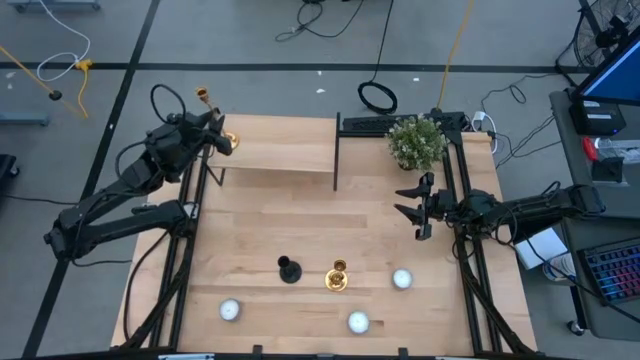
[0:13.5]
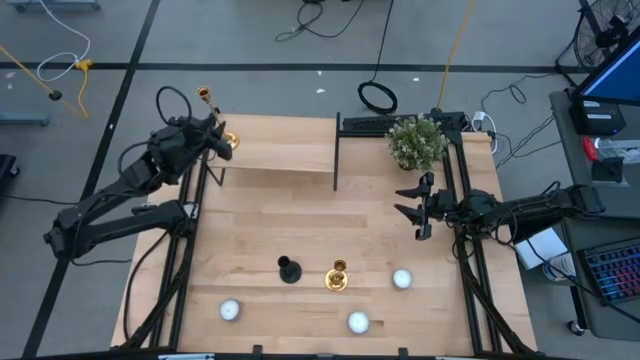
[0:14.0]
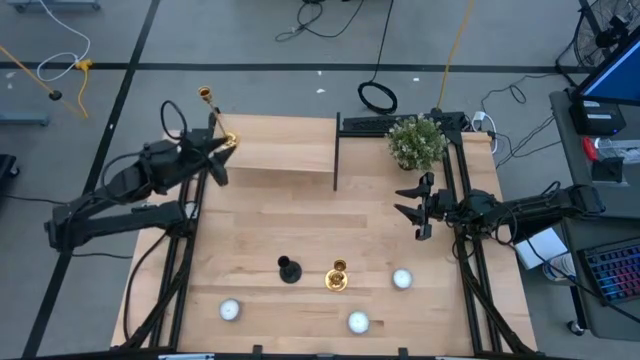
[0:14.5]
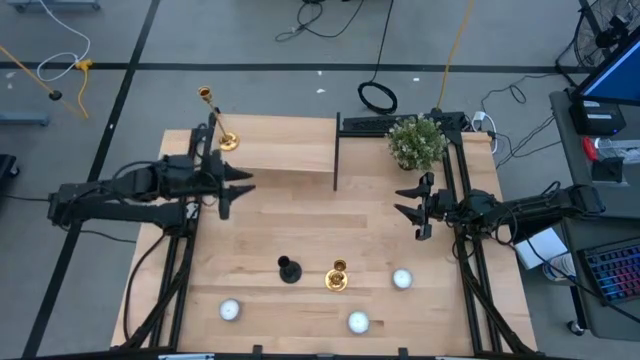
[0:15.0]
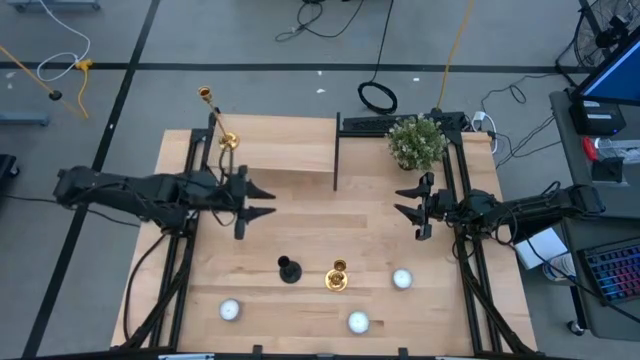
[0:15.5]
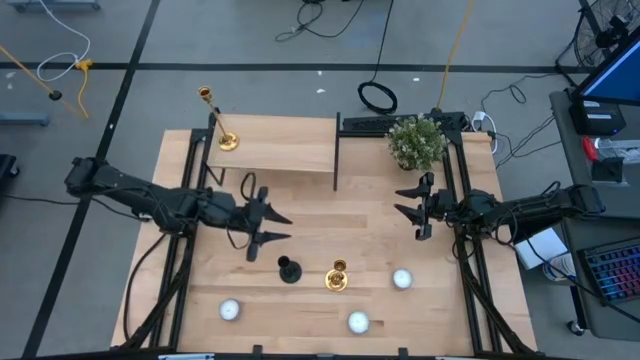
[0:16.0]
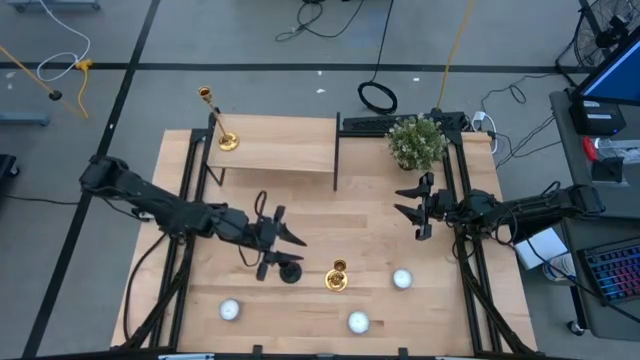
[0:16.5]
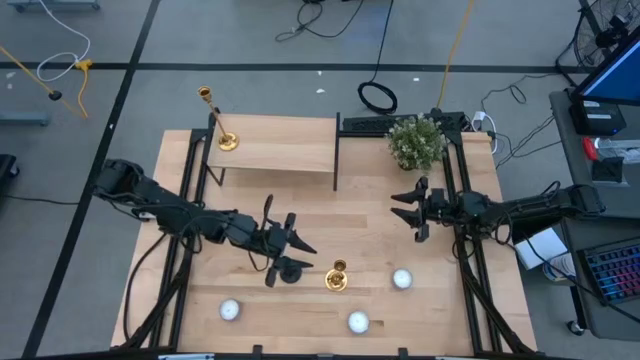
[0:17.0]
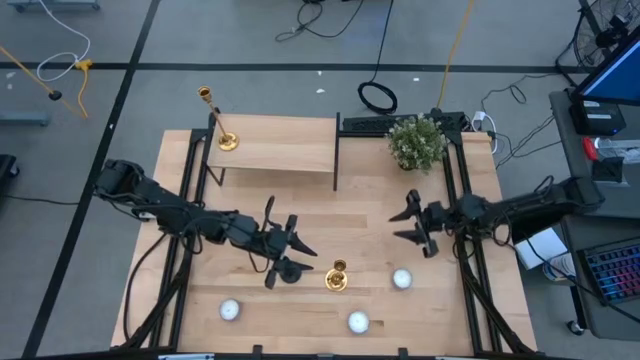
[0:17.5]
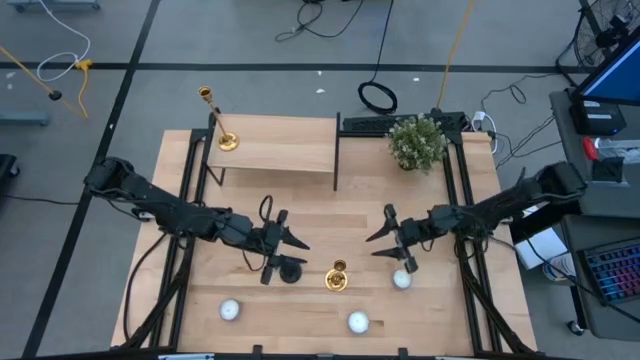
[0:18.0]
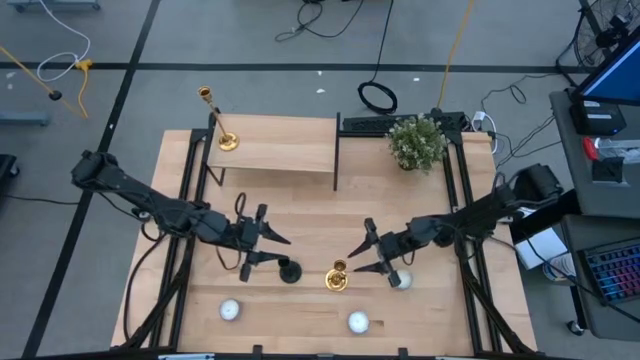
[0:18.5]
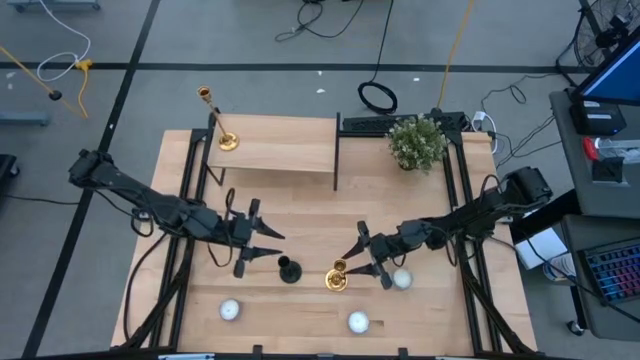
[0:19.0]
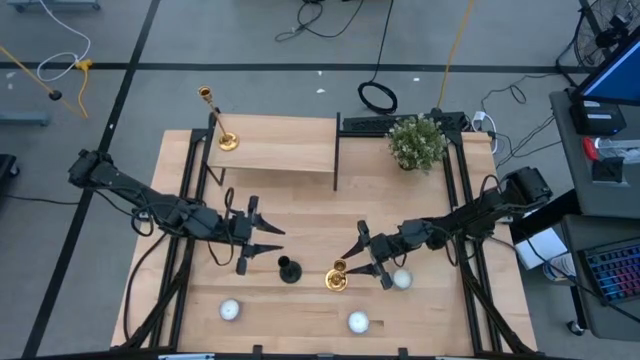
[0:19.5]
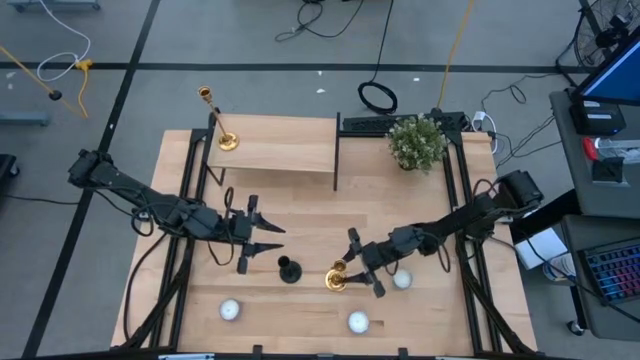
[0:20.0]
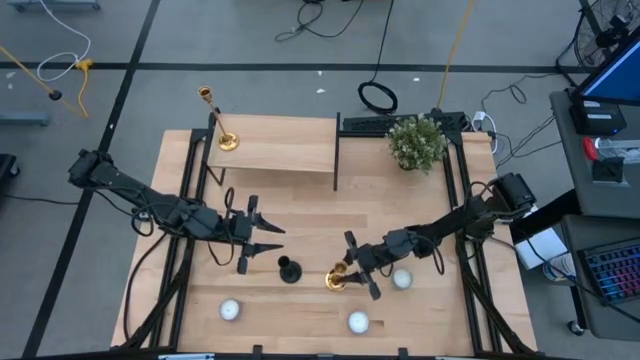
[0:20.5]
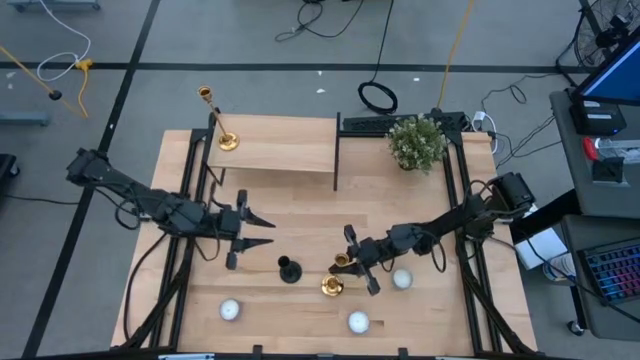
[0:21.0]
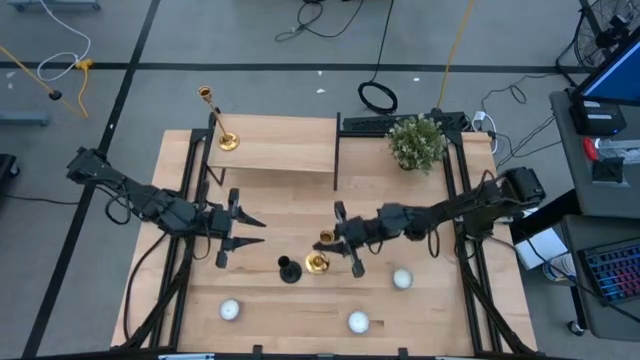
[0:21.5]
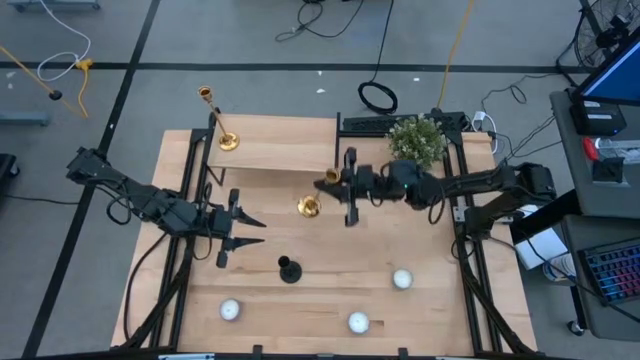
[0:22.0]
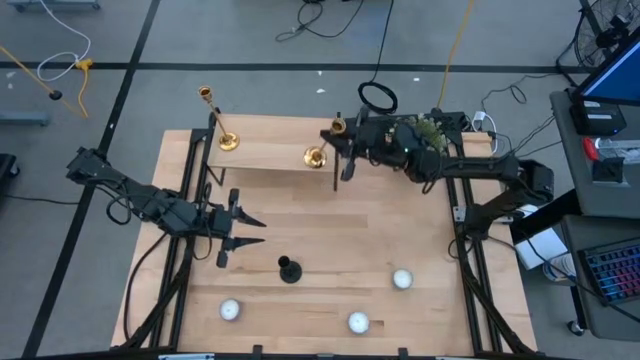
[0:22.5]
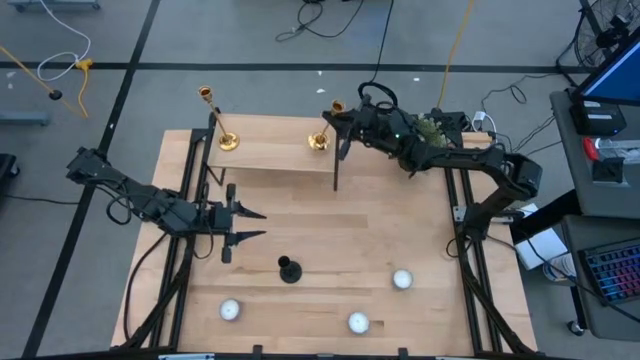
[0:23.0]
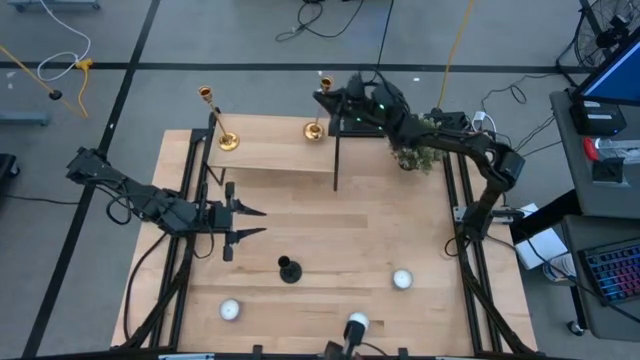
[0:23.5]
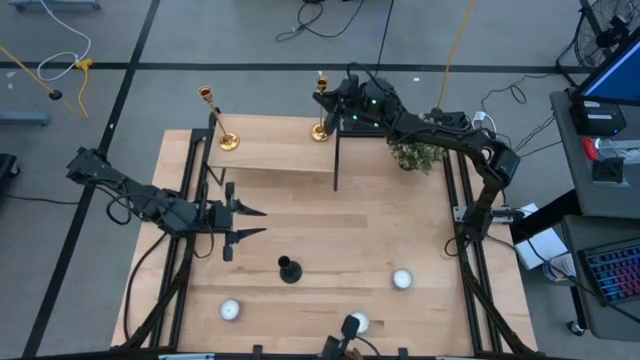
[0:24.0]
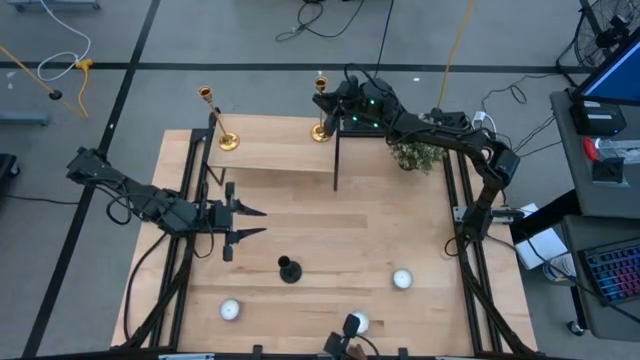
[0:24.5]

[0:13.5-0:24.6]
Task: Pick & Place candle stick holders
Put the gold candle holder on the shelf

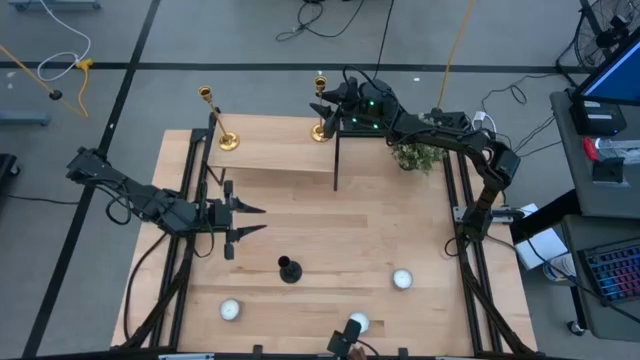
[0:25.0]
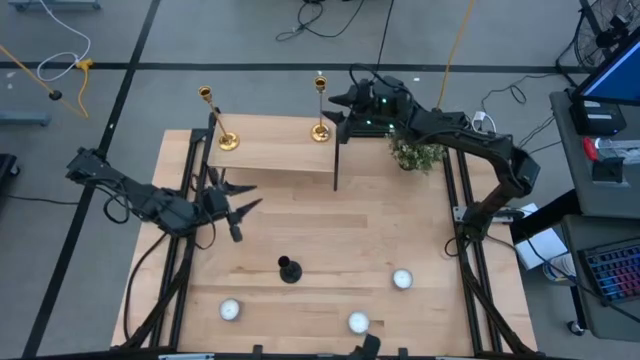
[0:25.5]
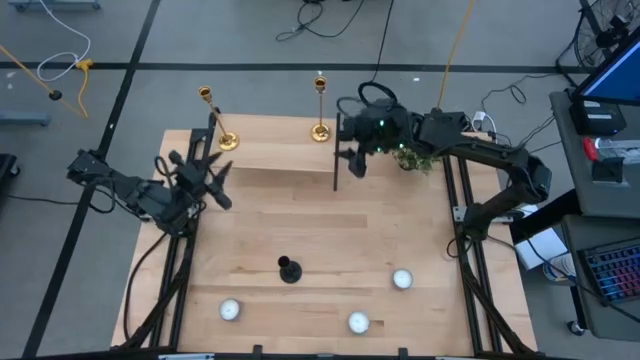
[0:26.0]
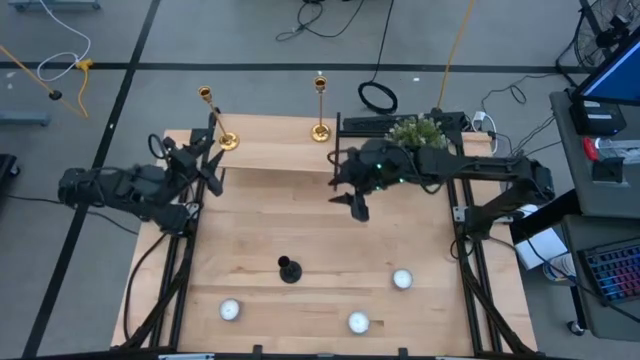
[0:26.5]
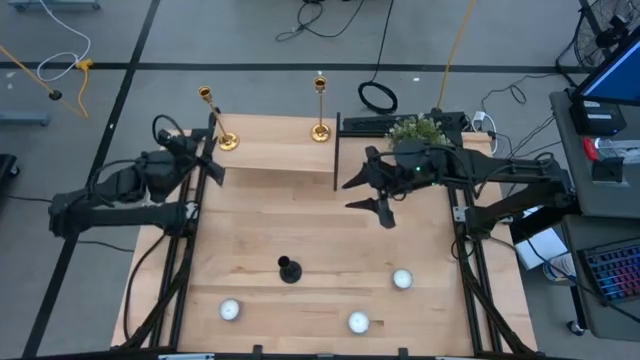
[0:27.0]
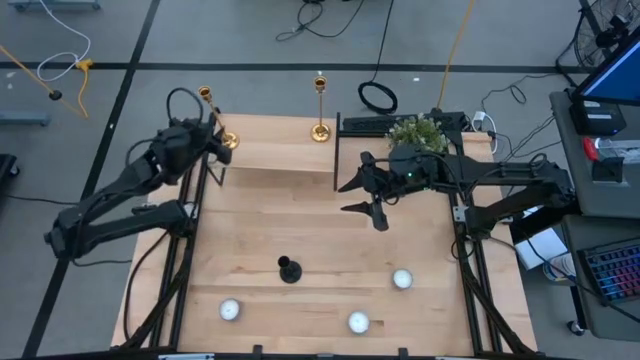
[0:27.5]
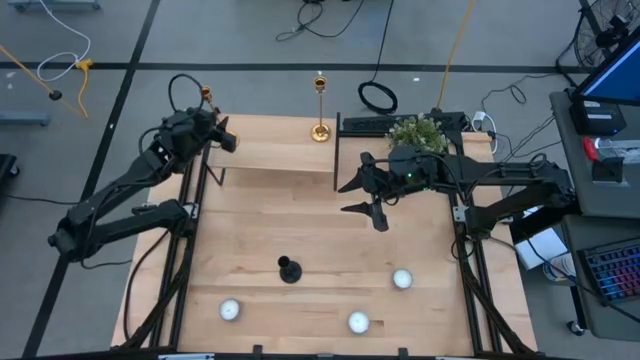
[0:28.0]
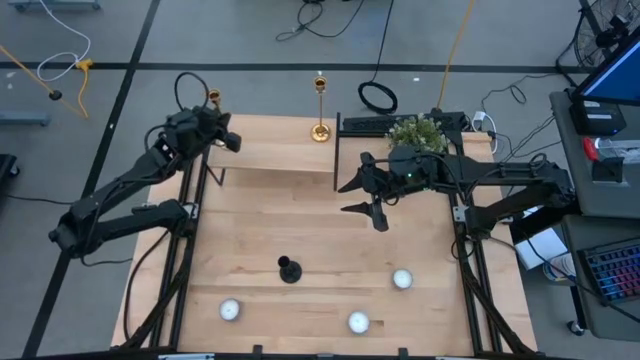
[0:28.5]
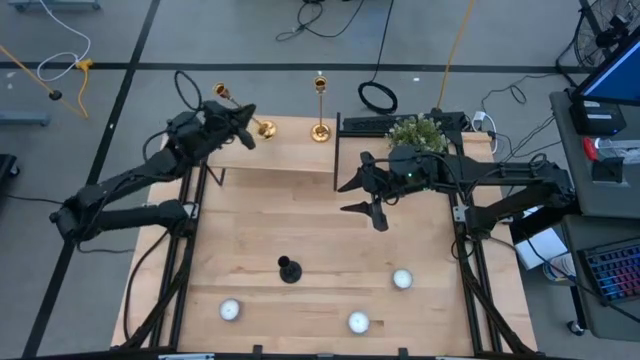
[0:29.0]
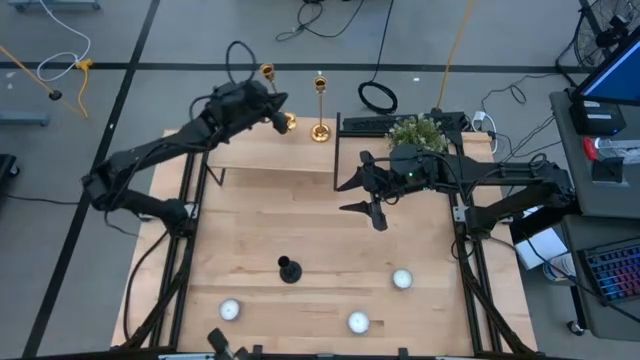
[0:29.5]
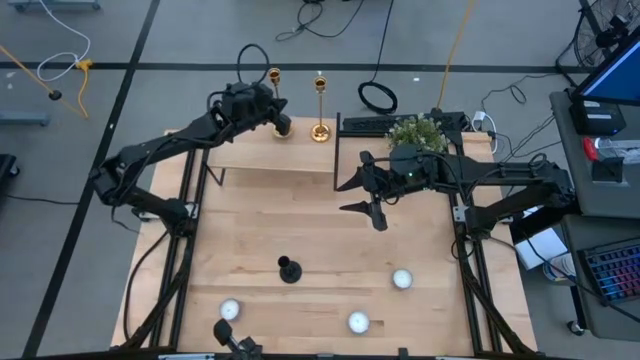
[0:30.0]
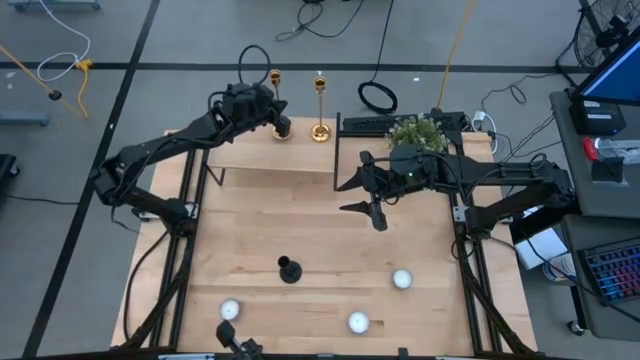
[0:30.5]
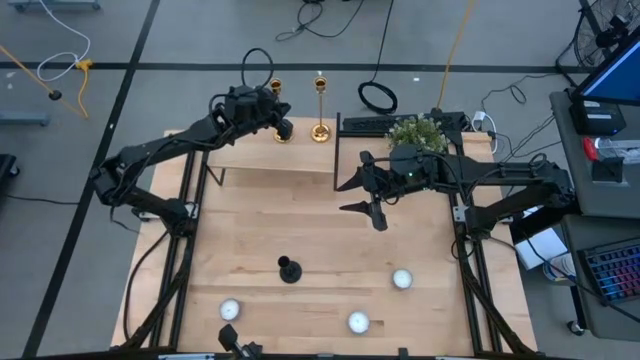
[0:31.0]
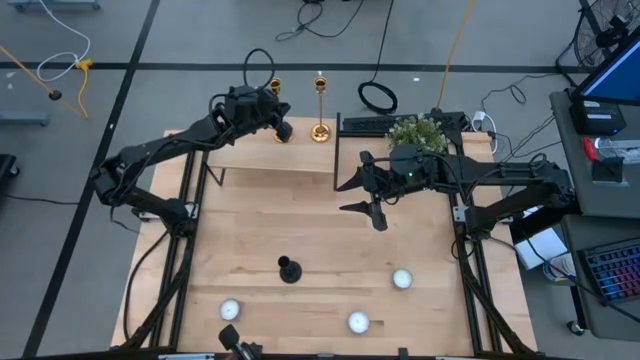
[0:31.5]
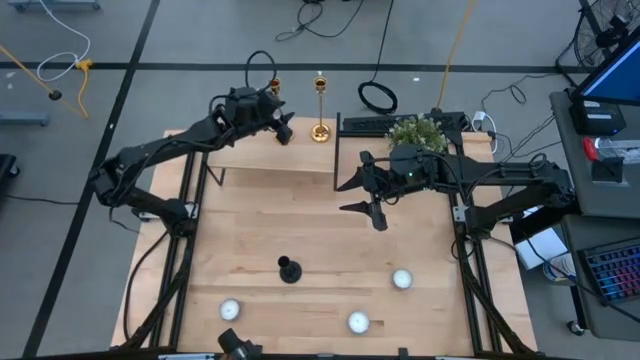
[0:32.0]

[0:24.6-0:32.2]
Adjust the gold candle holder on the shelf

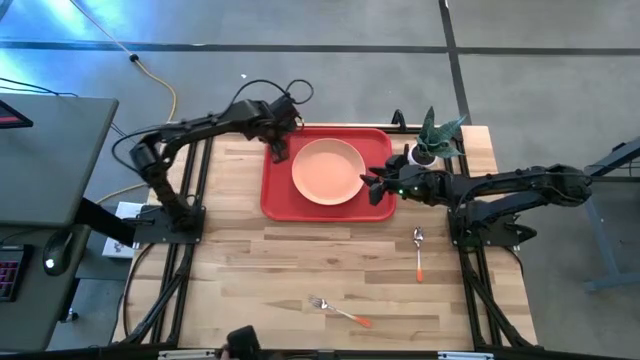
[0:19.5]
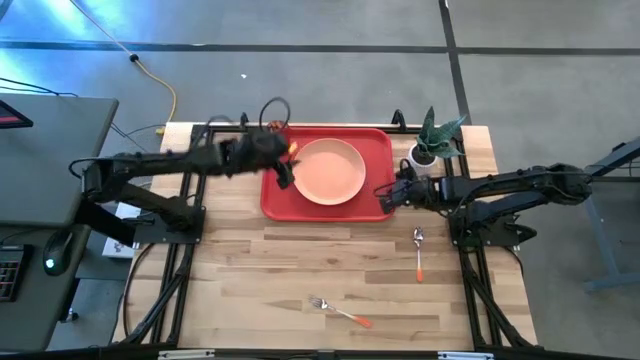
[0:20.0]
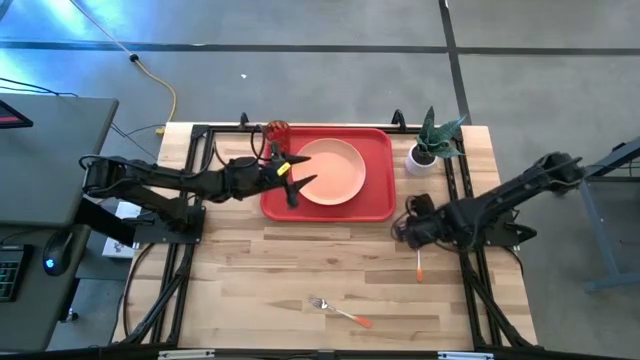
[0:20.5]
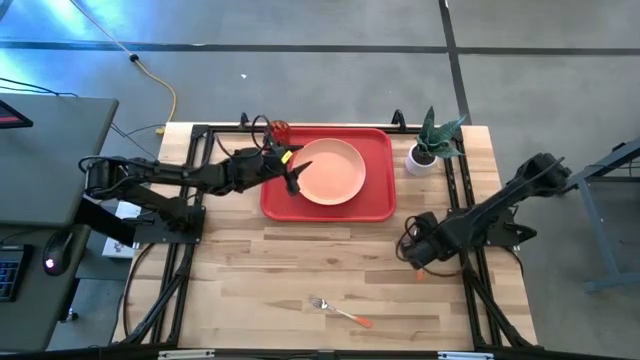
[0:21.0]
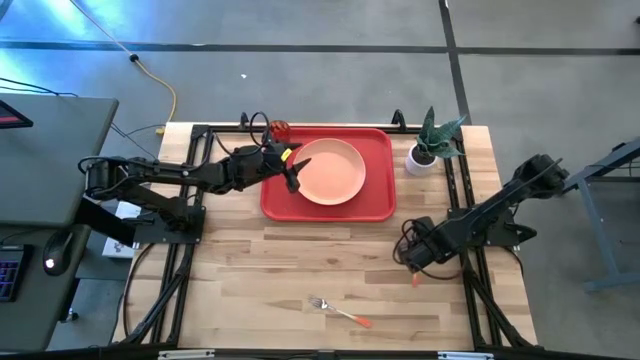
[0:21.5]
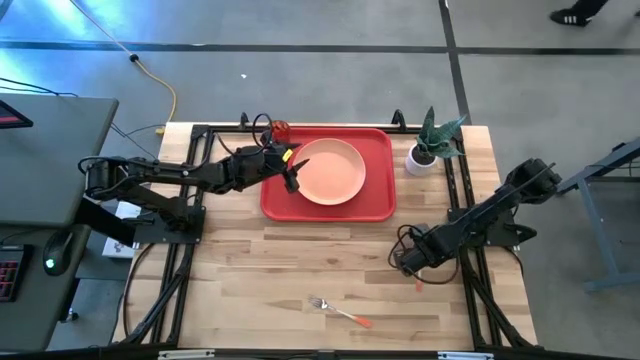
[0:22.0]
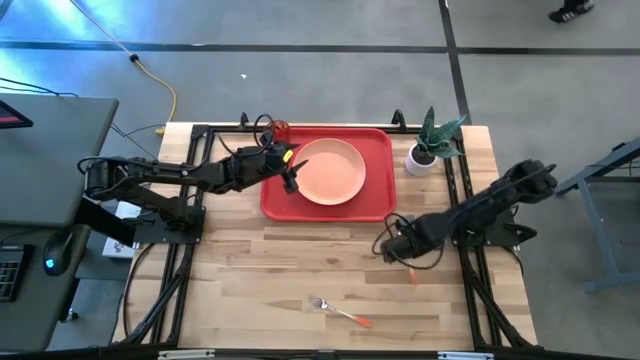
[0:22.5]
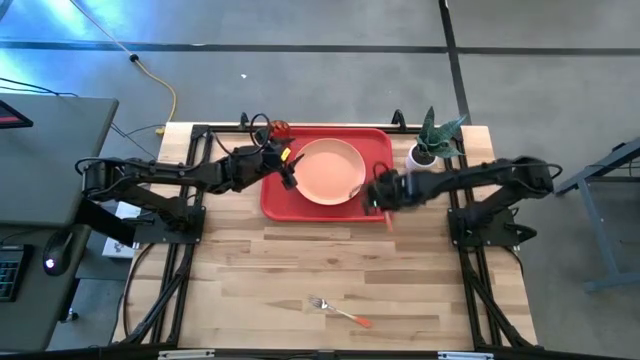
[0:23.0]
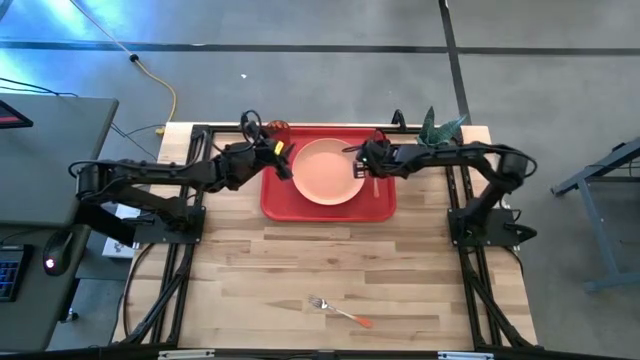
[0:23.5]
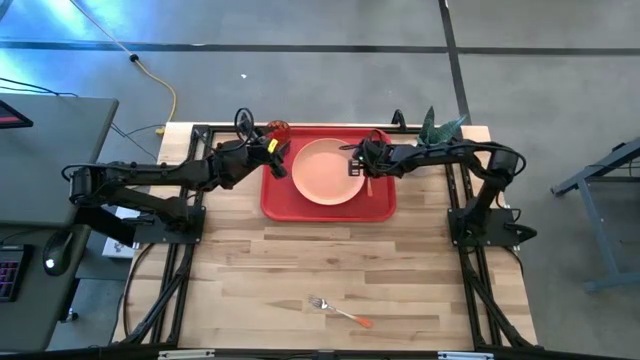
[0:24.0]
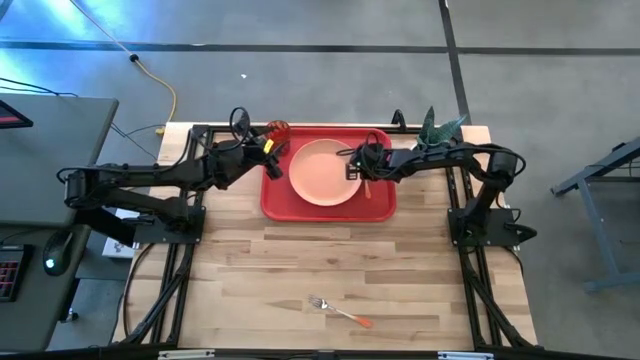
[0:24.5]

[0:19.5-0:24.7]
Task: Pick and place plate/cup/fork/spoon on tray
Put the orange spoon to the right of the light orange plate on the red tray
